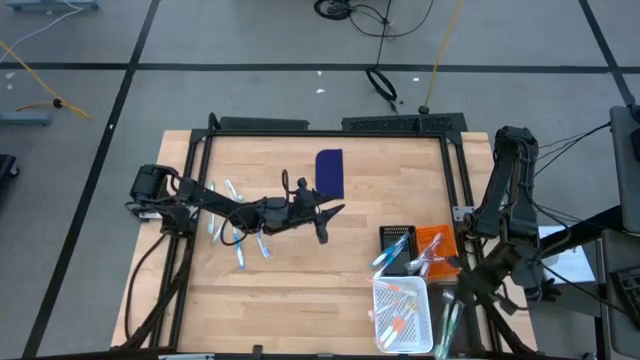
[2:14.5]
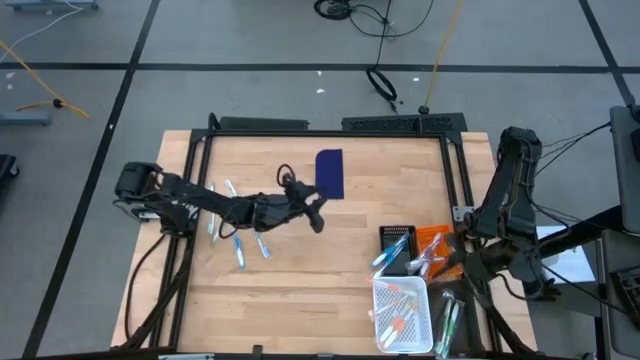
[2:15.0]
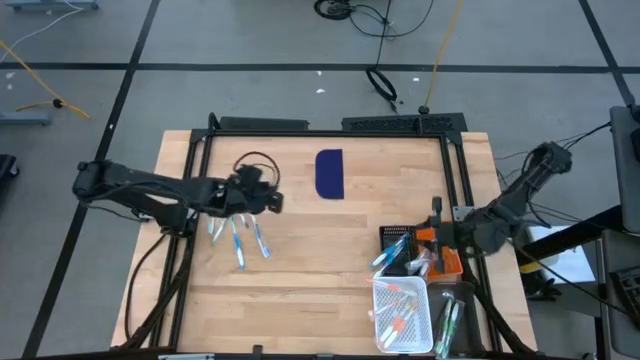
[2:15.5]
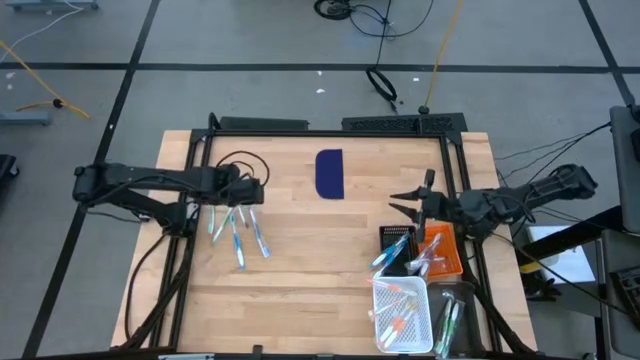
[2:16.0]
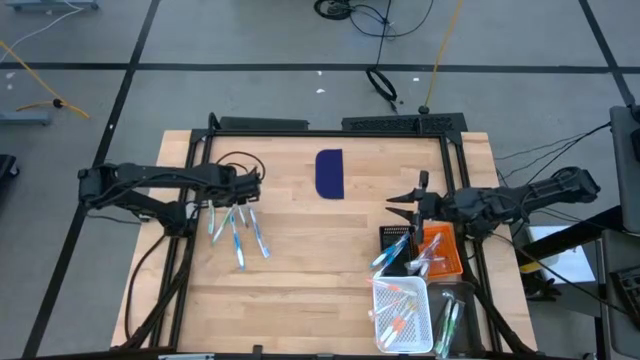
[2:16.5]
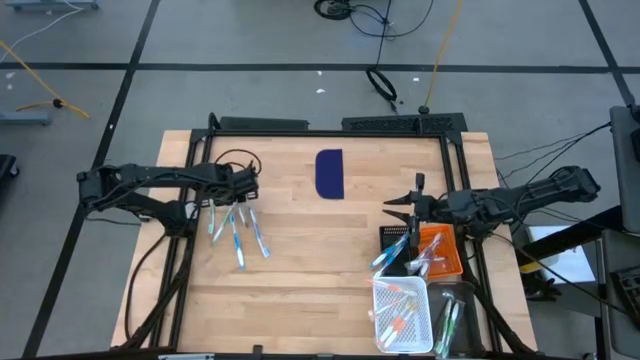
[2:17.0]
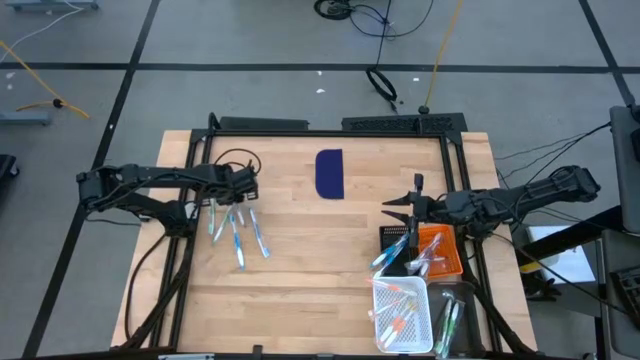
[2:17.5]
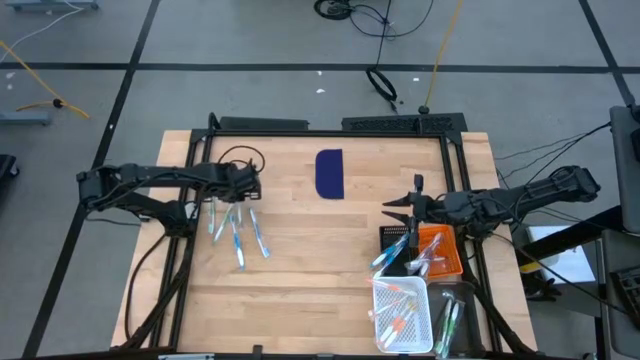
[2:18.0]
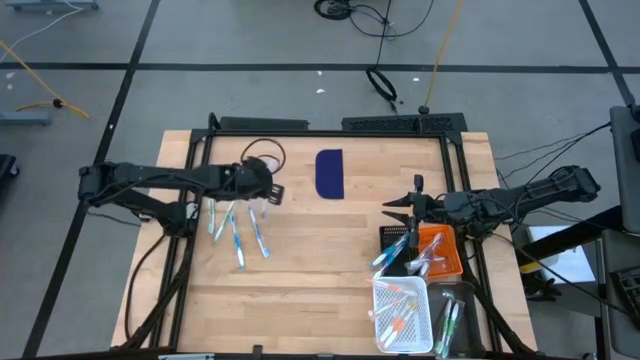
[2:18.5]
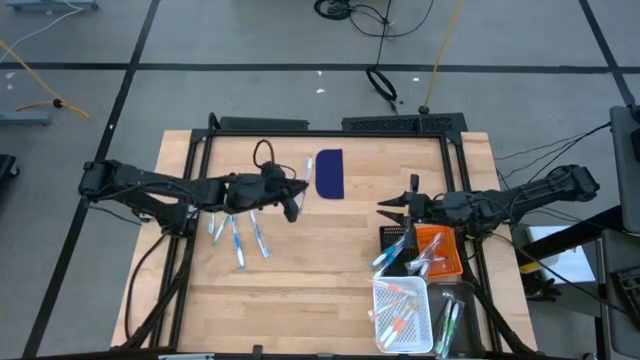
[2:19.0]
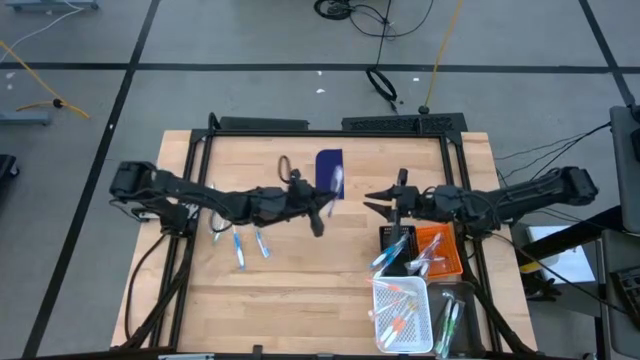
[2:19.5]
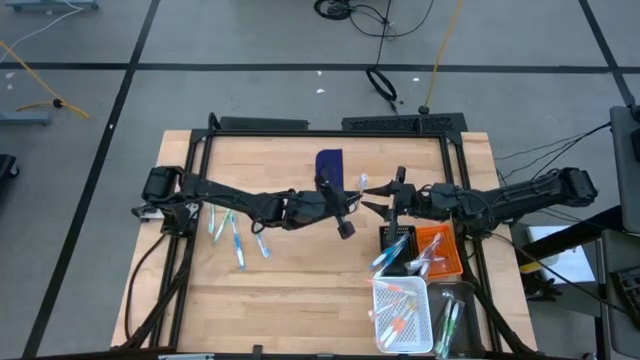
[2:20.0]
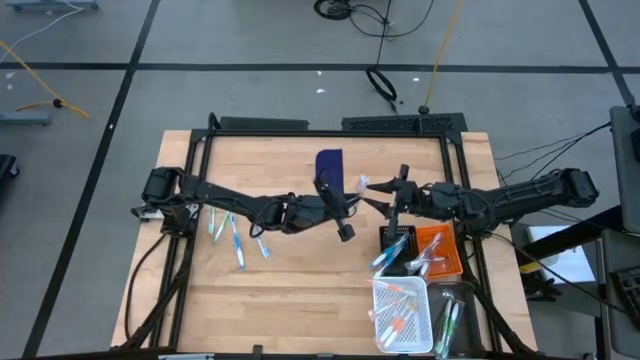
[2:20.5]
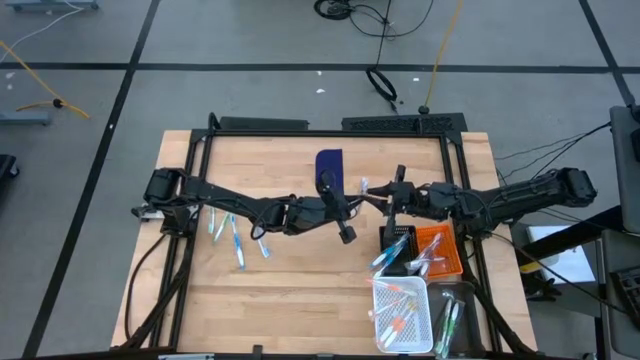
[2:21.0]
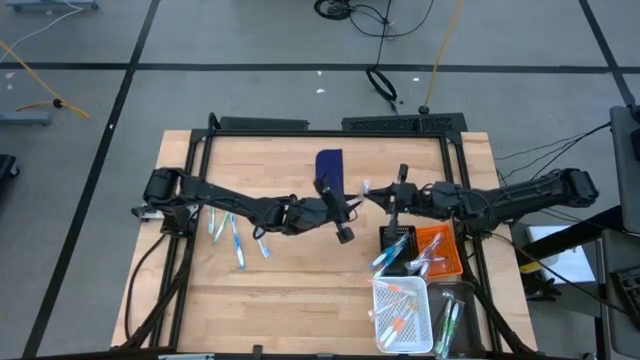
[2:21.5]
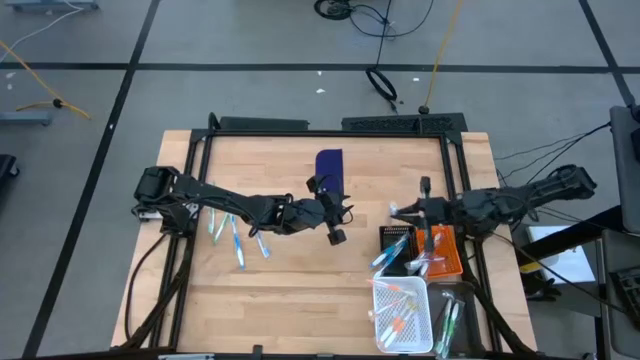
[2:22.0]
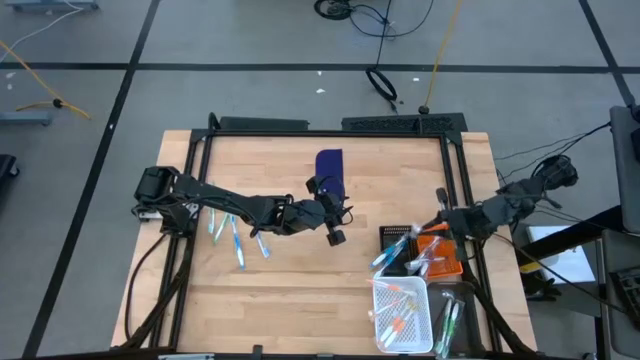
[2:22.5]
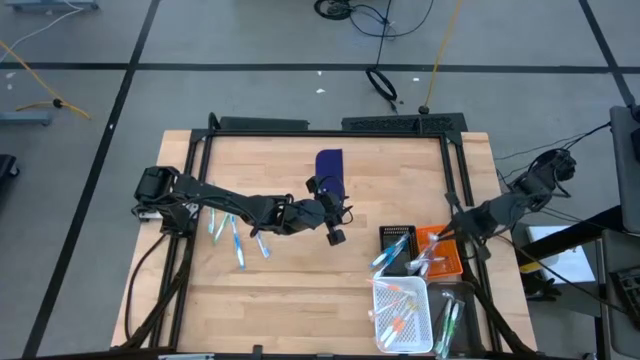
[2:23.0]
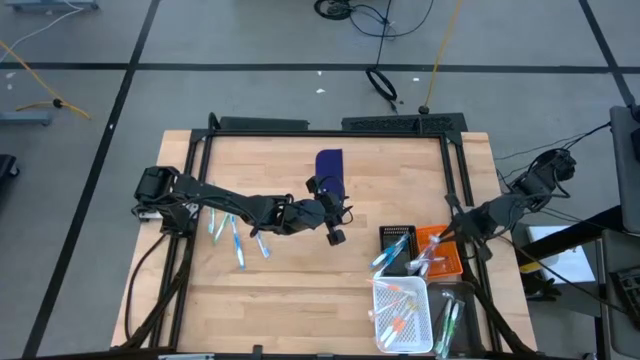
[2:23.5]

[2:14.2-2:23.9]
Task: Pick & Place Toothbrushes
Put the violet toothbrush into the orange basket

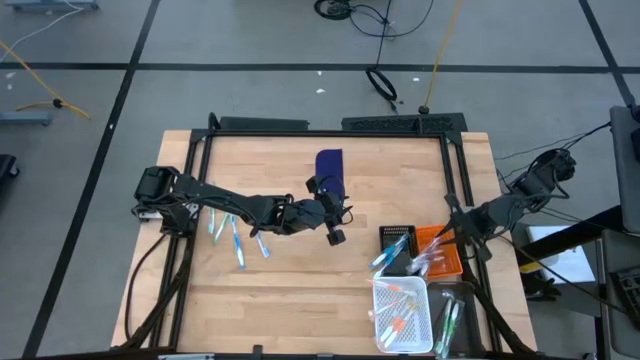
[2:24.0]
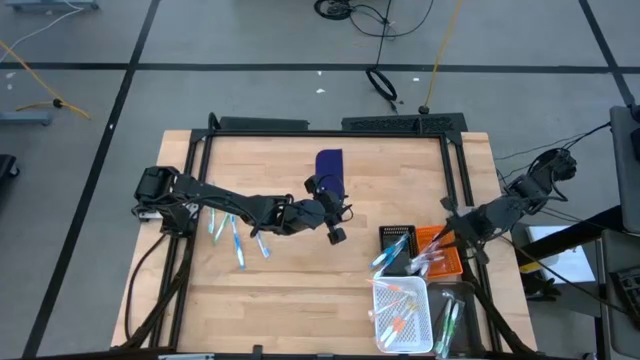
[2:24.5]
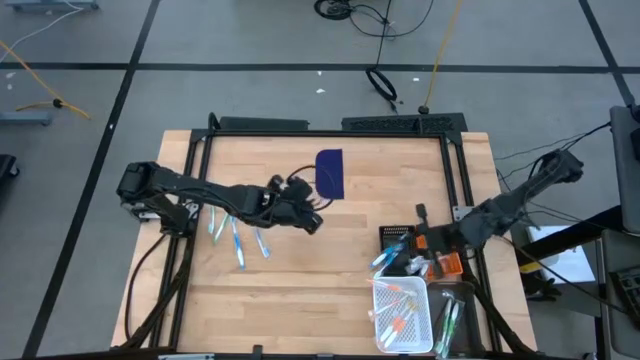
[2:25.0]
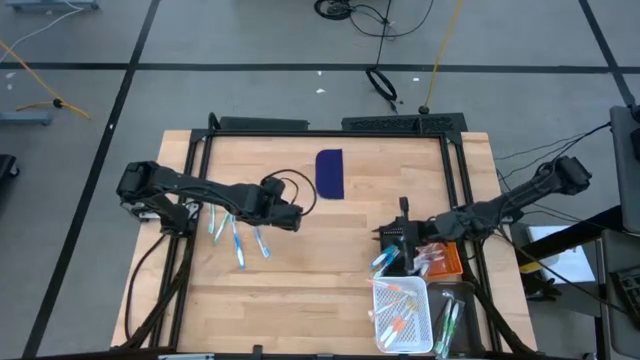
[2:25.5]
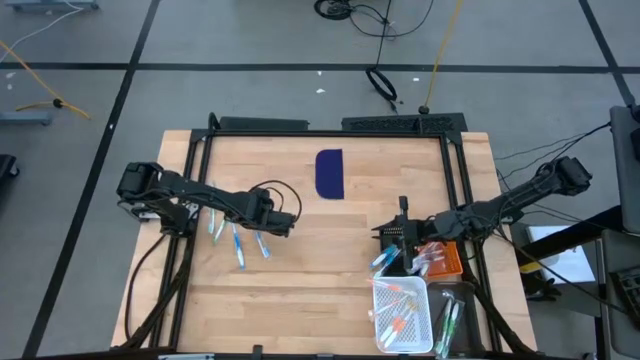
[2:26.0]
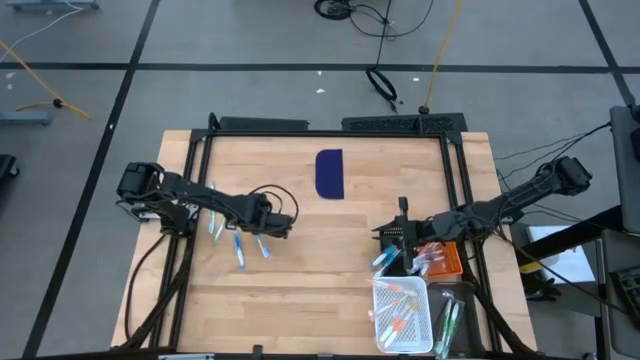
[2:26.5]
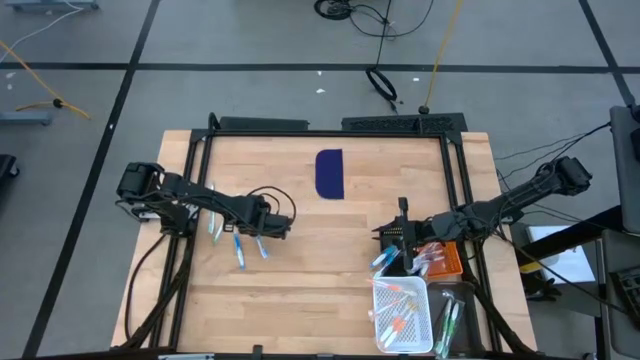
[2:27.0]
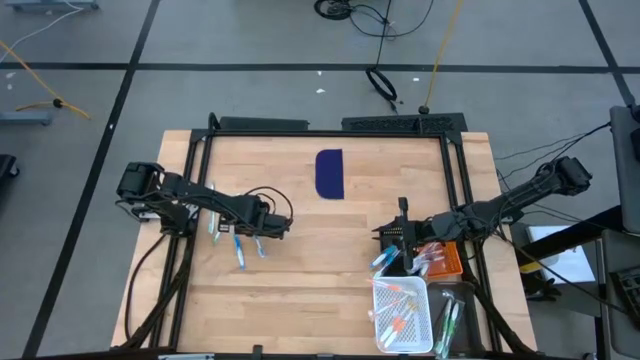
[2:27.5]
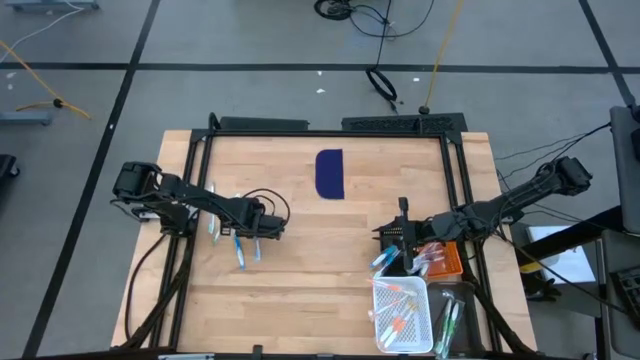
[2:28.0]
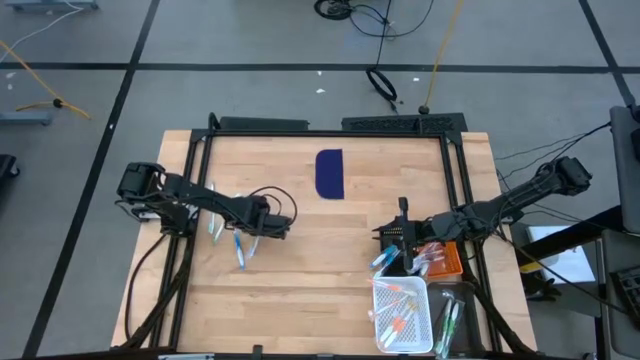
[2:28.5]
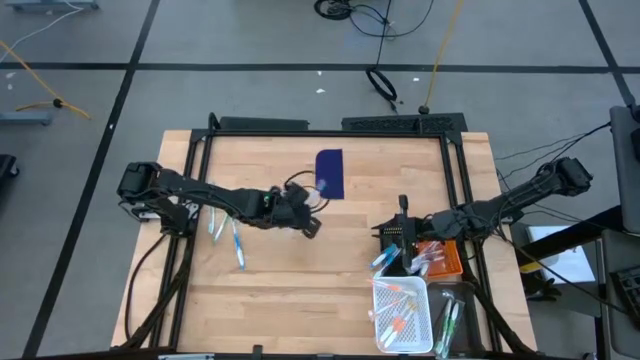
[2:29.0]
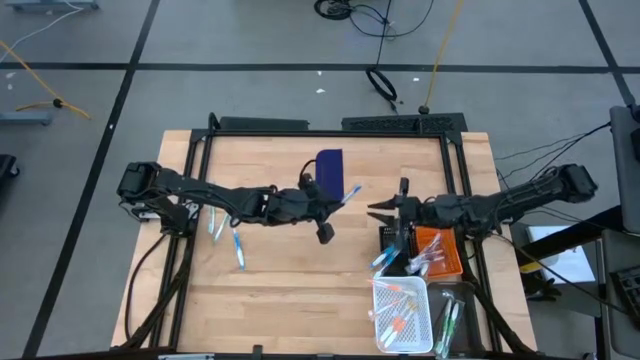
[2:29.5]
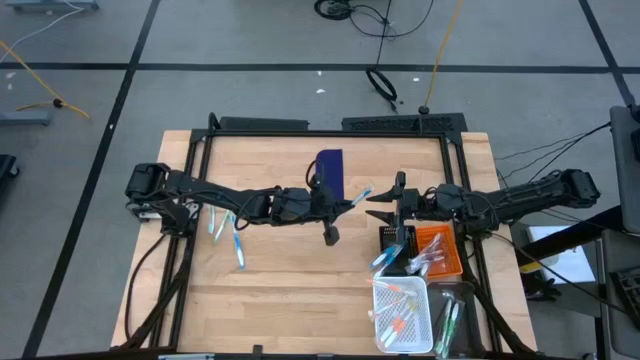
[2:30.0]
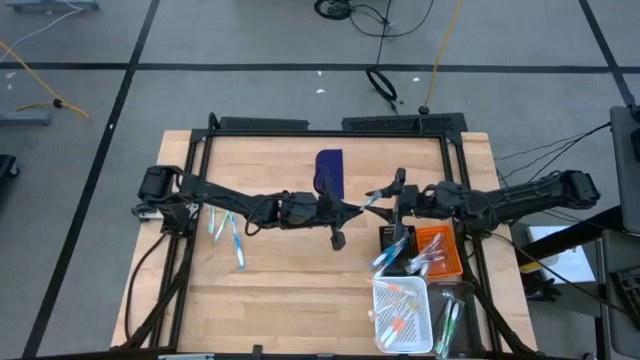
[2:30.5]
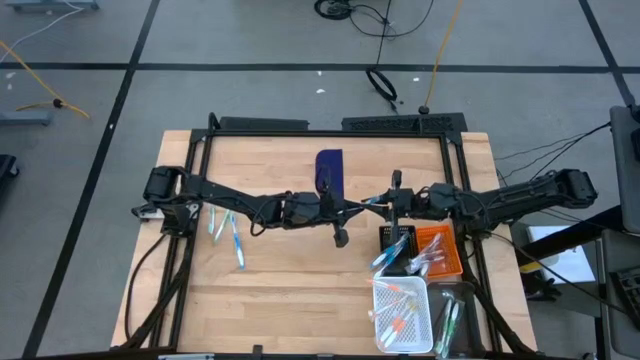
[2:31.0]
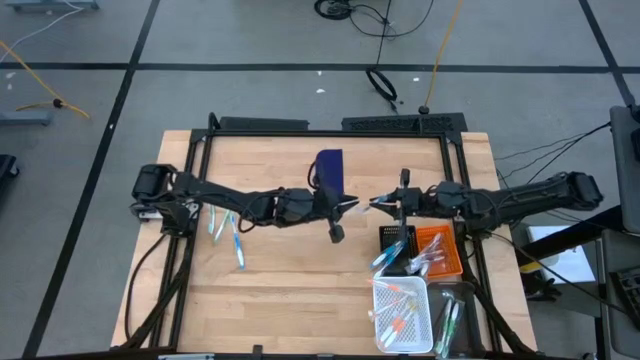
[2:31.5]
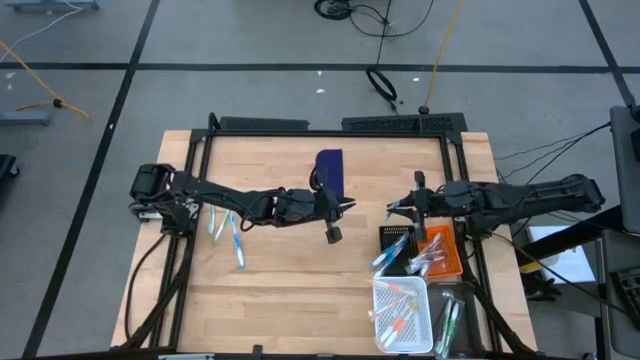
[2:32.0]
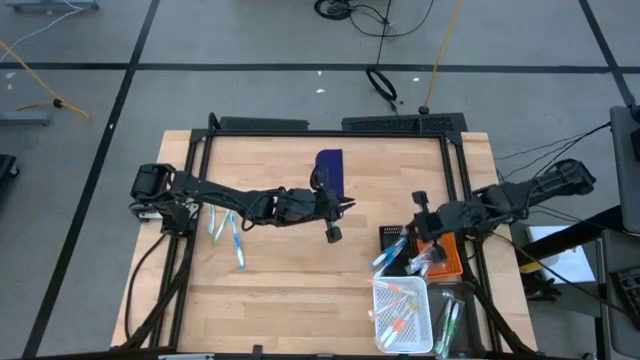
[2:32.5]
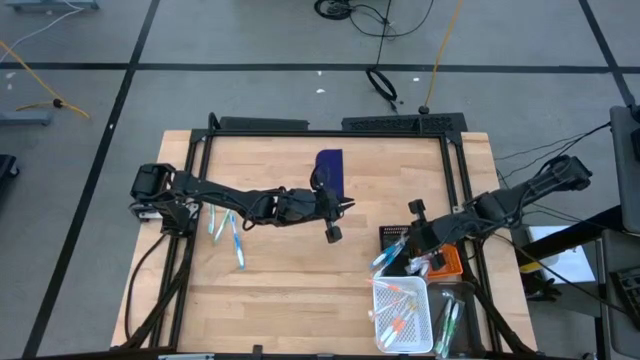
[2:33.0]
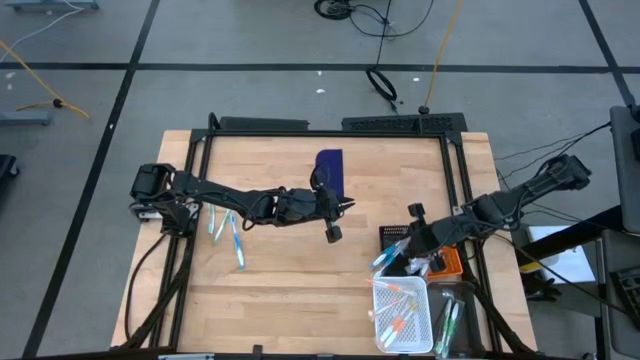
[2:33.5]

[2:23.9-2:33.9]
Put the blue toothbrush into the black basket
